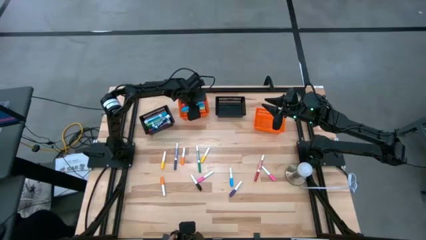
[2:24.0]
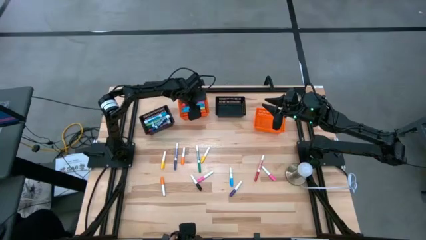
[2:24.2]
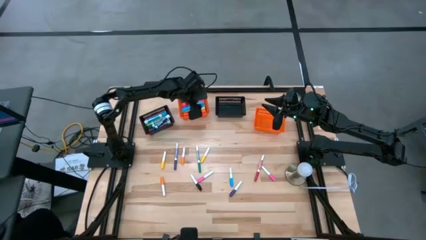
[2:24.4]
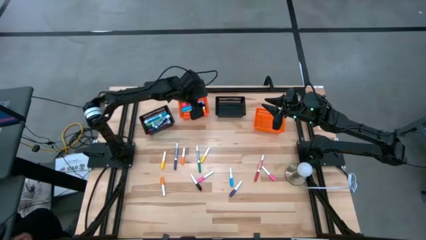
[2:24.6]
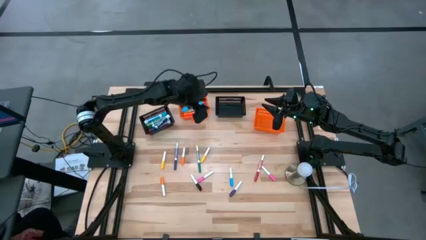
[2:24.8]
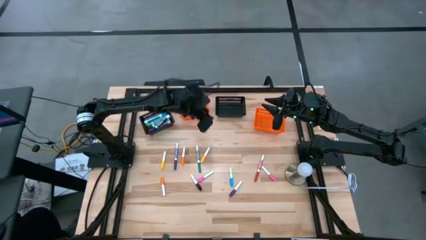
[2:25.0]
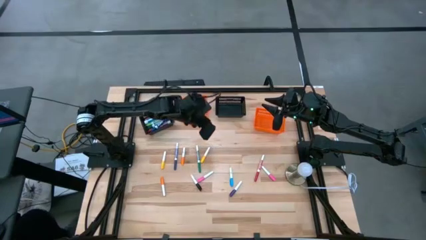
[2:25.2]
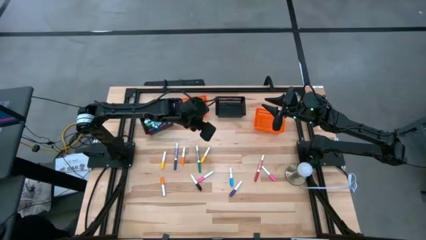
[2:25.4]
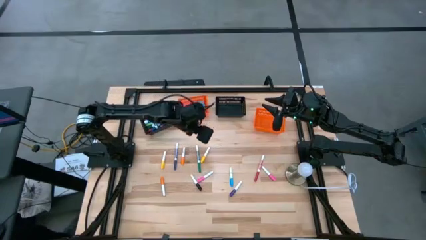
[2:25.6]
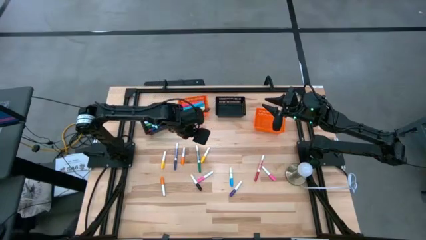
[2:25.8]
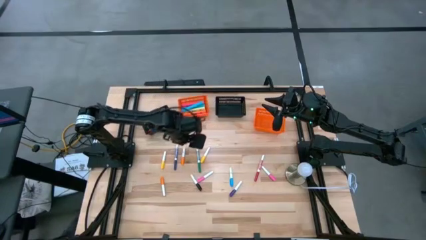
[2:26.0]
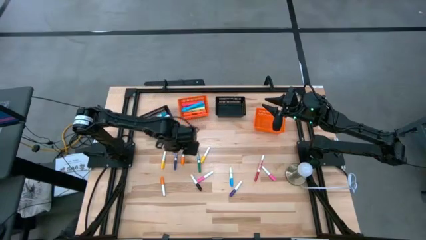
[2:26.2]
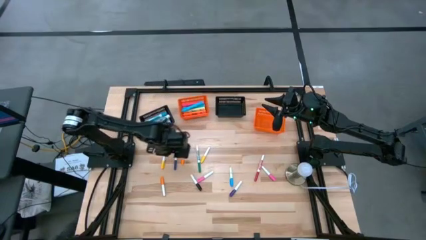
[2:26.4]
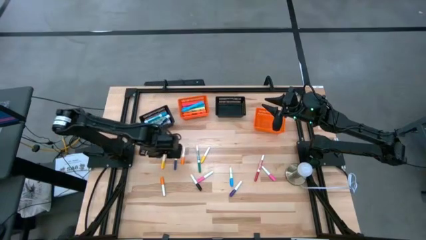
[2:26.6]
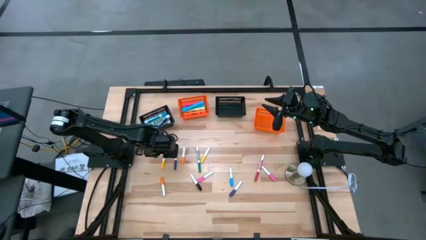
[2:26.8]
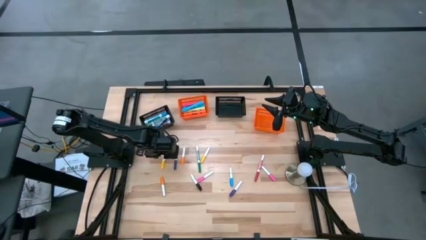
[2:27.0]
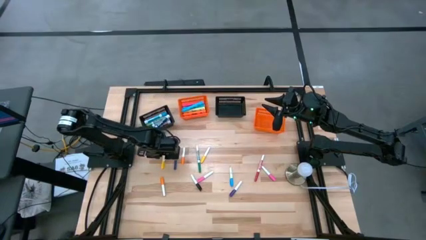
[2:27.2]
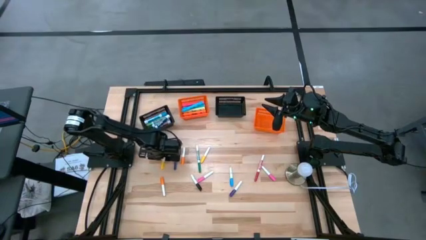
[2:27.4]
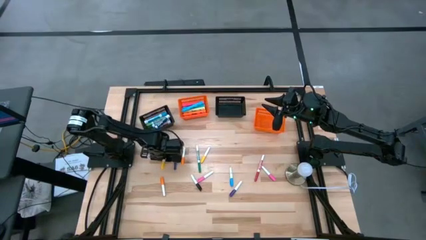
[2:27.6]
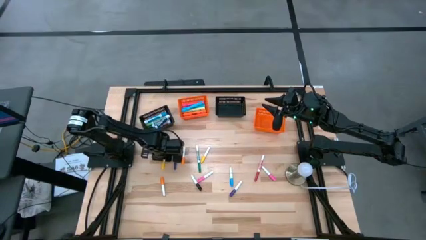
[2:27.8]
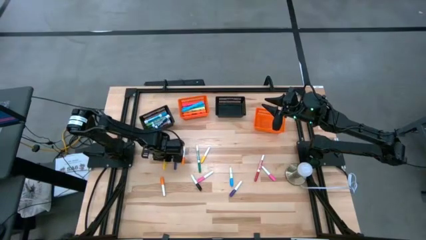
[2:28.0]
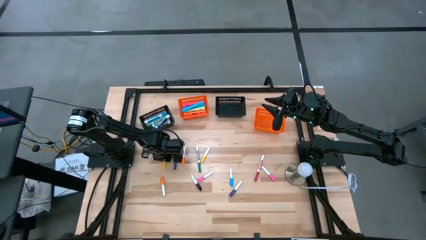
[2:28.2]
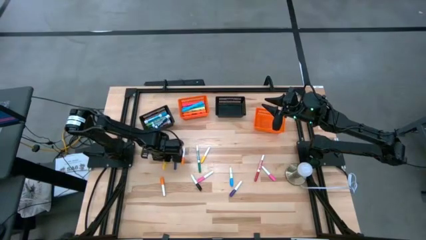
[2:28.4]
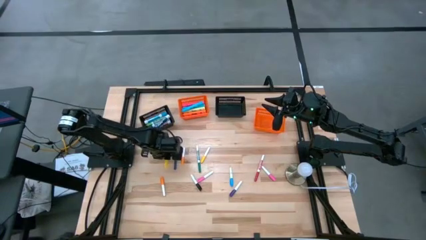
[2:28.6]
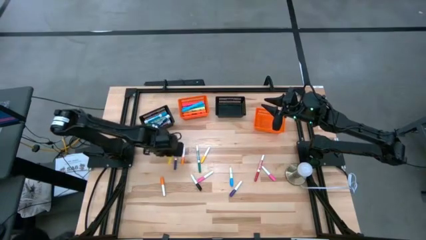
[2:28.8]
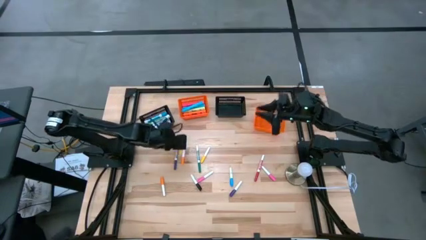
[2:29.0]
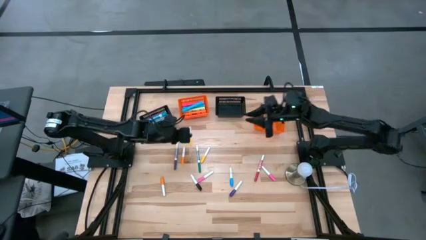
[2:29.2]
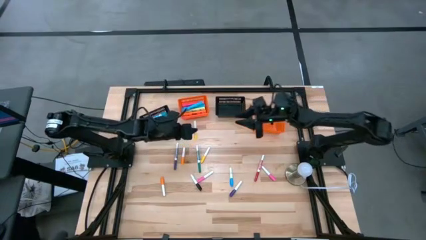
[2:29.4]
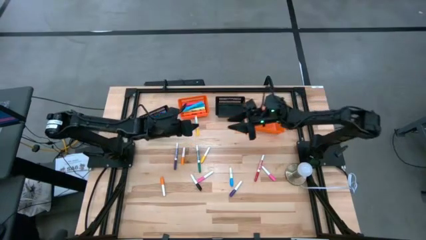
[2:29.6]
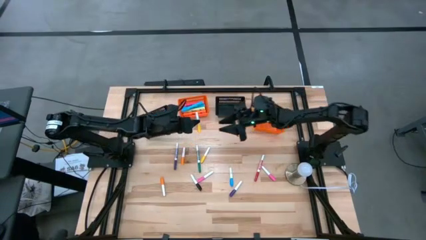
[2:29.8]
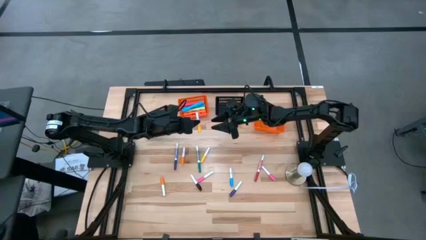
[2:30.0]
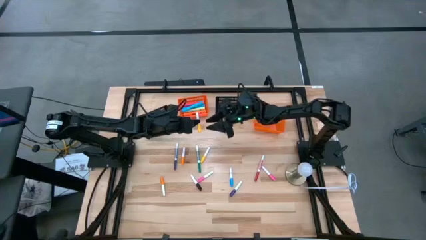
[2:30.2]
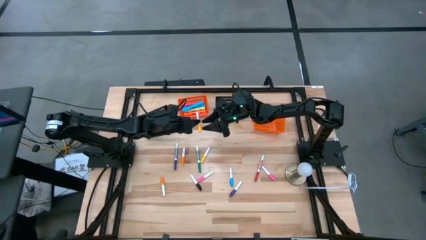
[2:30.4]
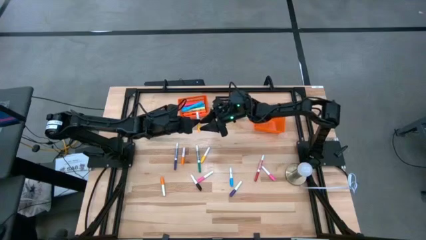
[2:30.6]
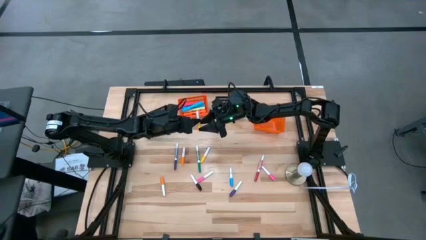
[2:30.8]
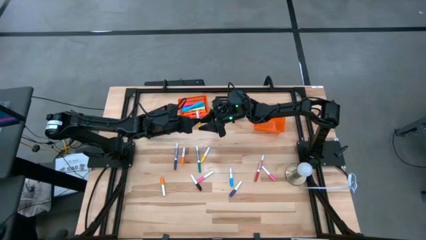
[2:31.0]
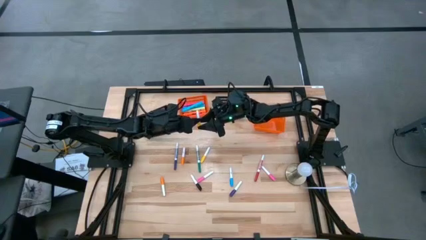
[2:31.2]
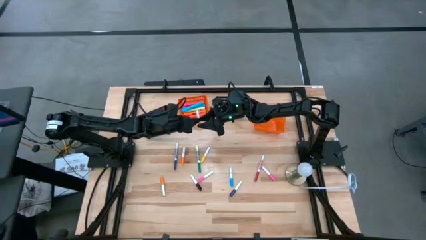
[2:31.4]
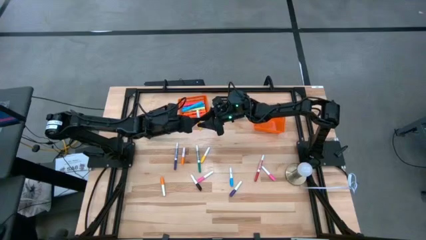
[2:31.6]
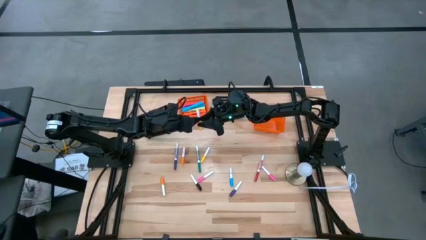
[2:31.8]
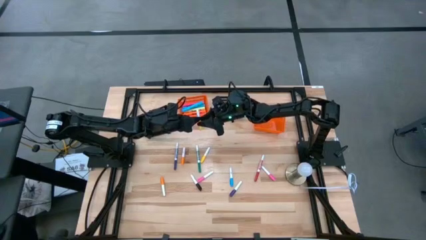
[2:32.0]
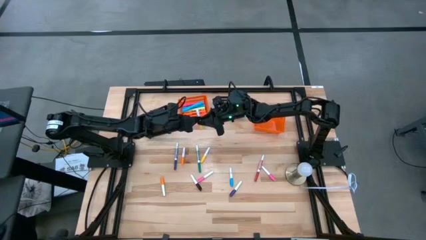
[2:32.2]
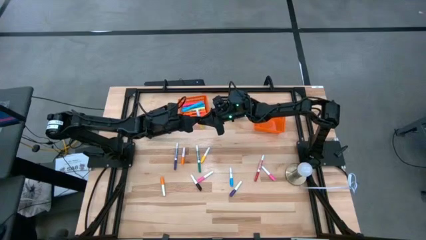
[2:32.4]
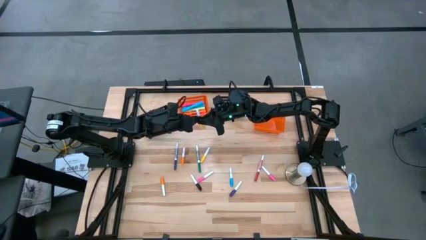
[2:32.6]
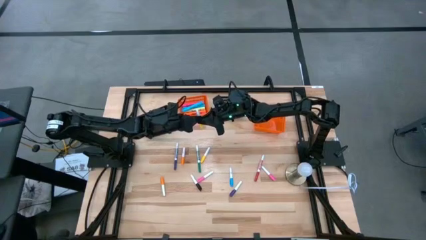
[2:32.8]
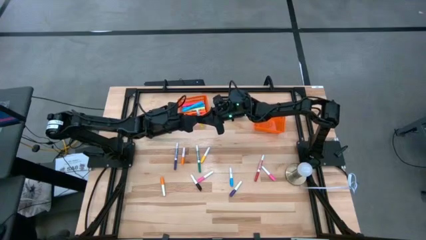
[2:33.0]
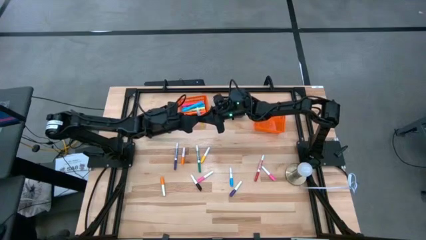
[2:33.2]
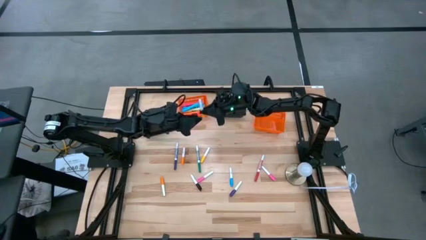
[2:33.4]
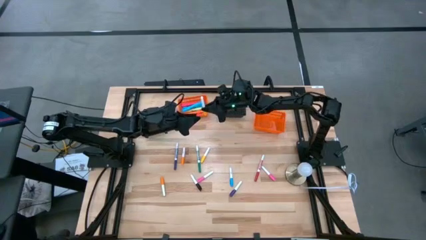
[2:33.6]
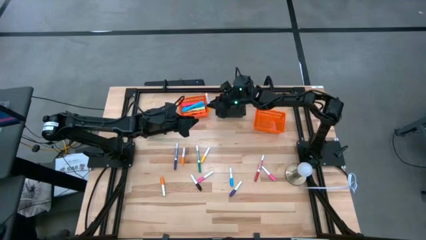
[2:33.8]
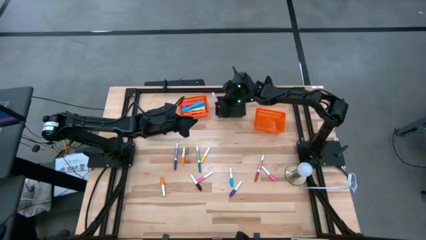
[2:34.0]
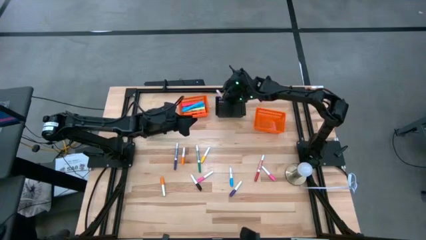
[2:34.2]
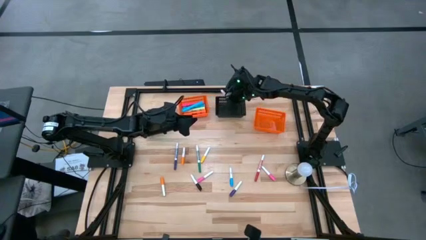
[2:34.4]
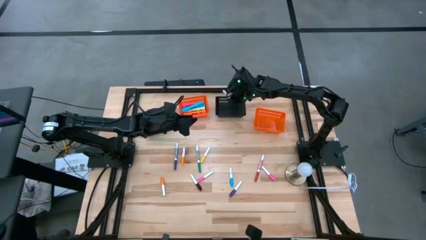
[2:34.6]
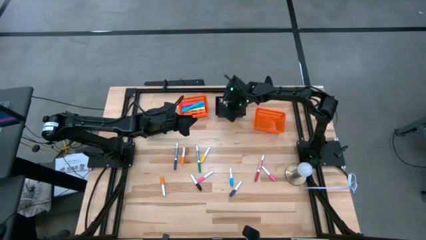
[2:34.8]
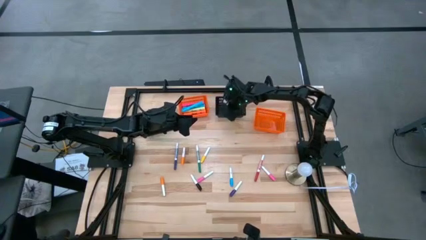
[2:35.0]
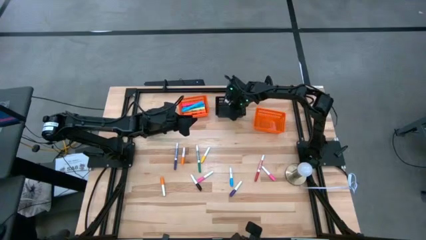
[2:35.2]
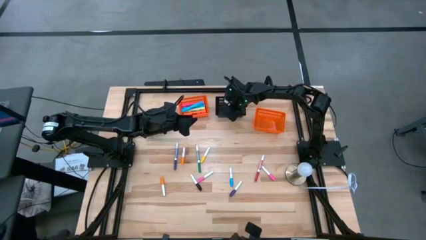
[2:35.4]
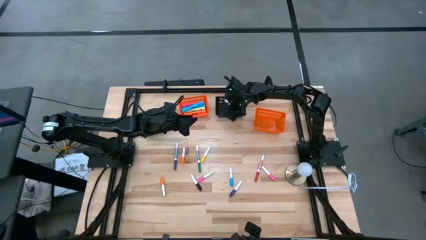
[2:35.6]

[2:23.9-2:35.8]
Task: Pick & Place Markers
Put the left small yellow highlighter pen into the right black bin
